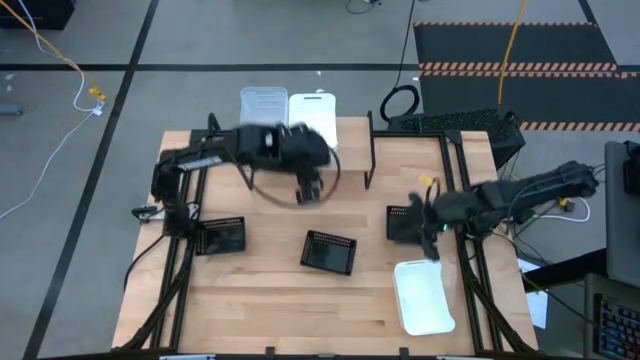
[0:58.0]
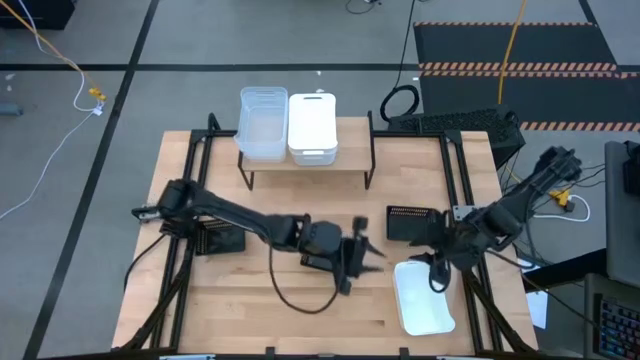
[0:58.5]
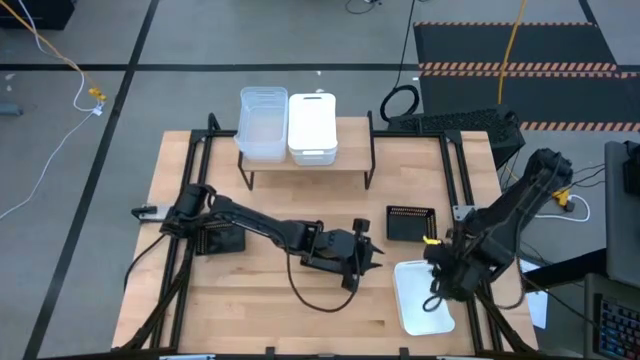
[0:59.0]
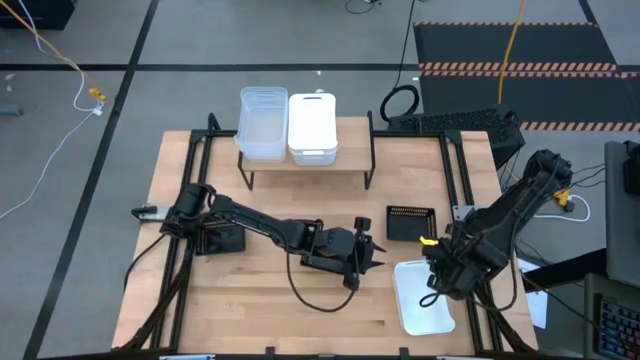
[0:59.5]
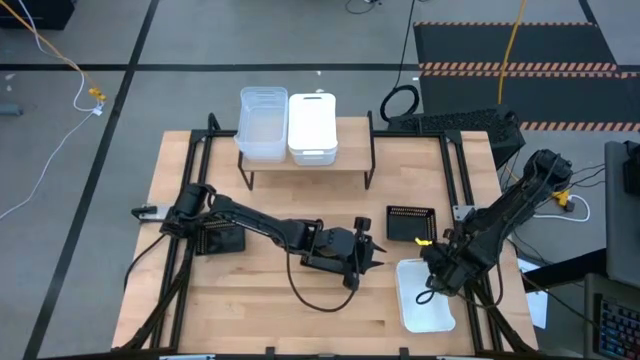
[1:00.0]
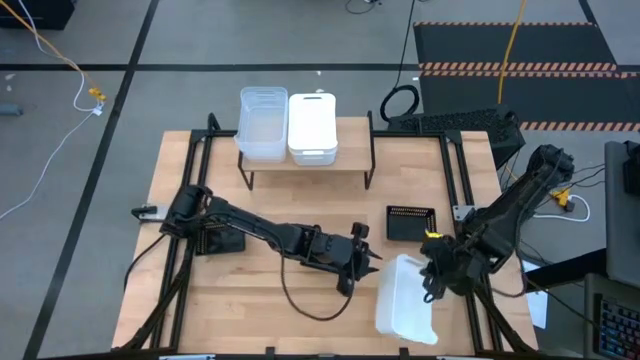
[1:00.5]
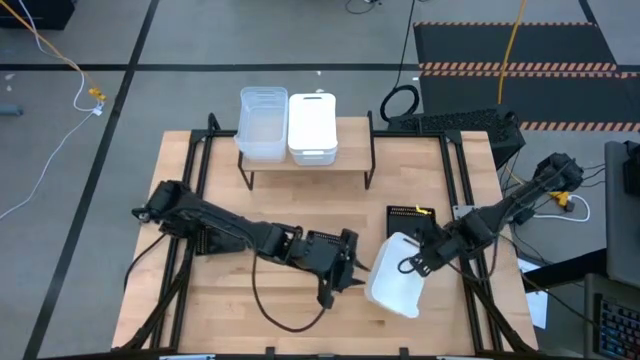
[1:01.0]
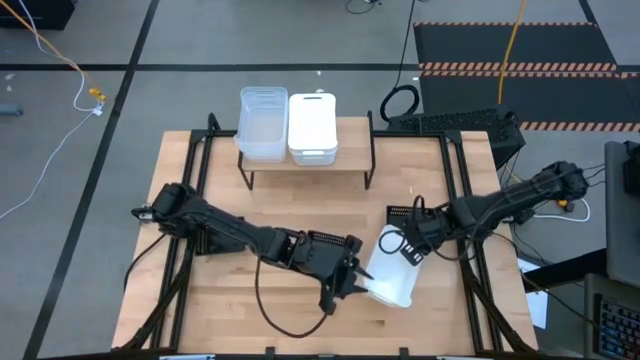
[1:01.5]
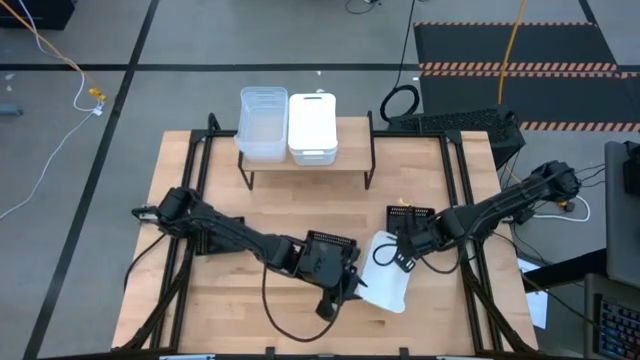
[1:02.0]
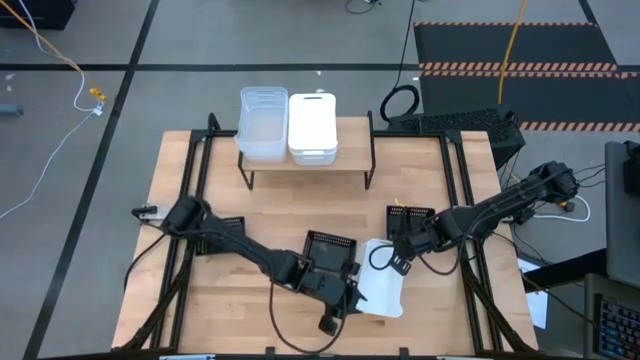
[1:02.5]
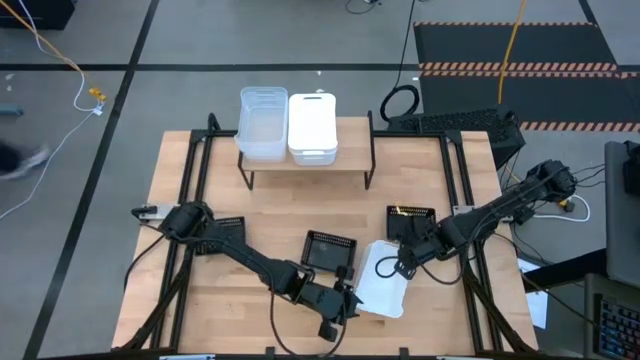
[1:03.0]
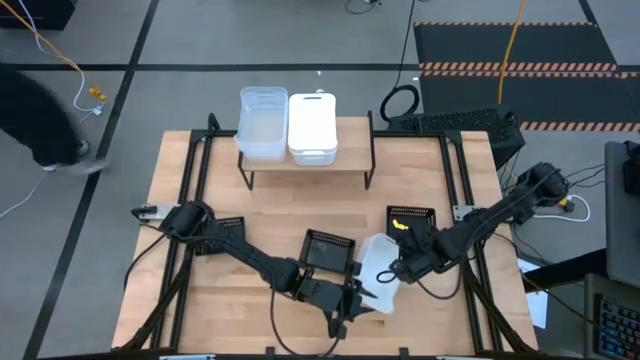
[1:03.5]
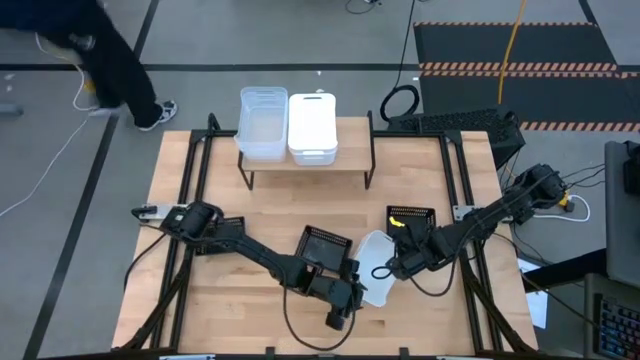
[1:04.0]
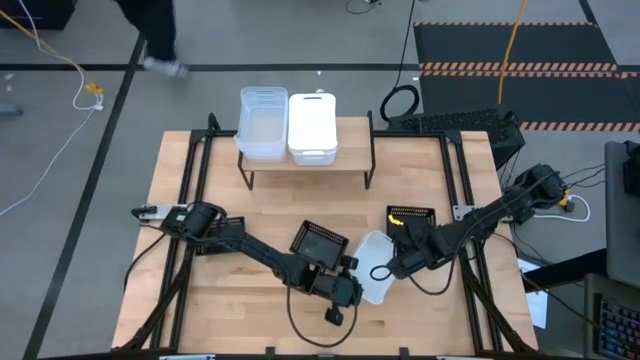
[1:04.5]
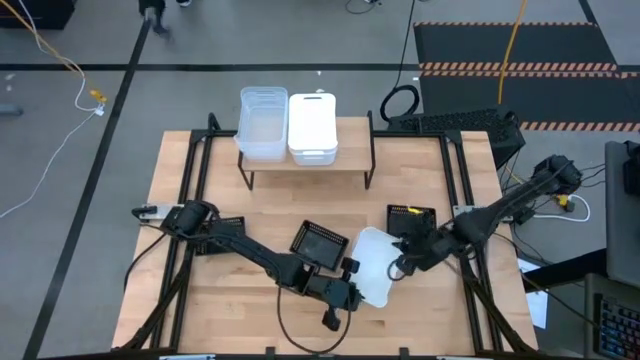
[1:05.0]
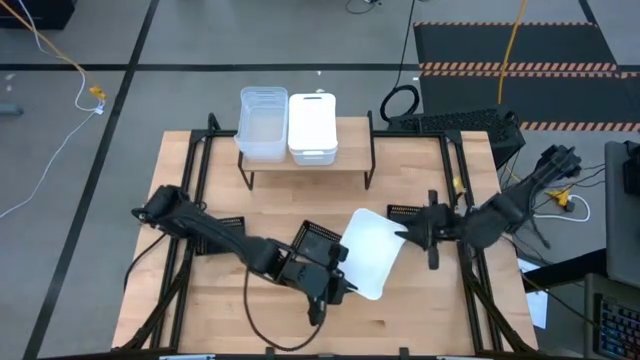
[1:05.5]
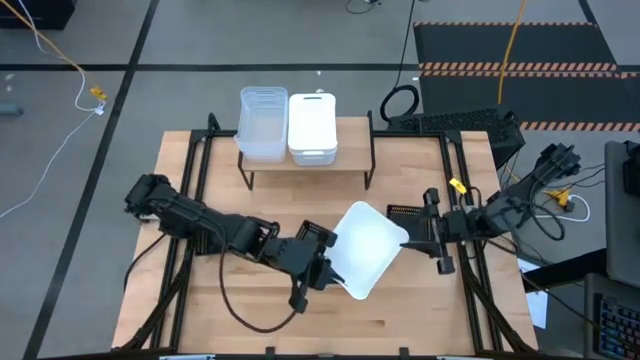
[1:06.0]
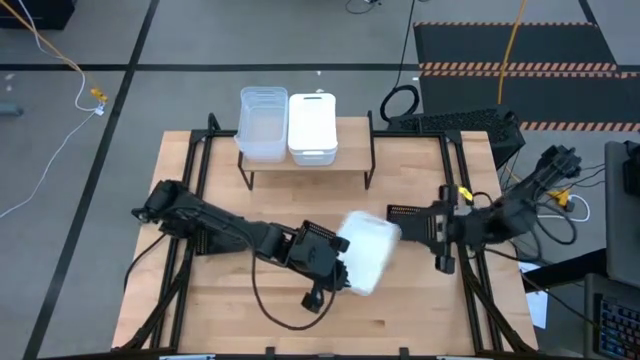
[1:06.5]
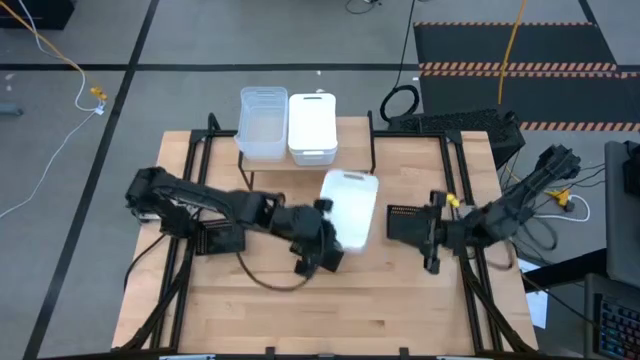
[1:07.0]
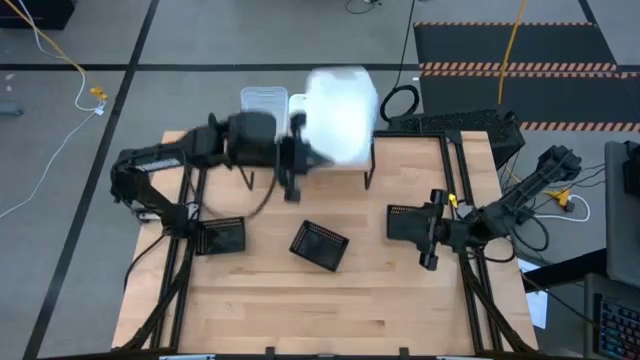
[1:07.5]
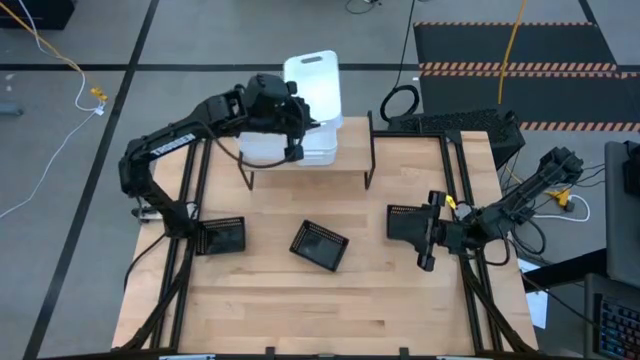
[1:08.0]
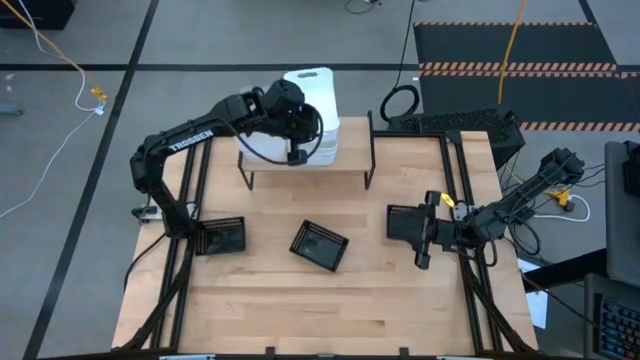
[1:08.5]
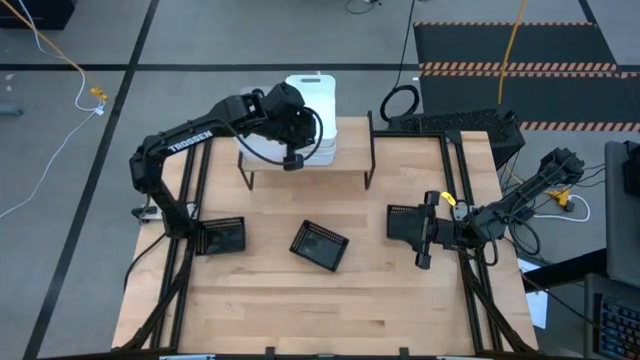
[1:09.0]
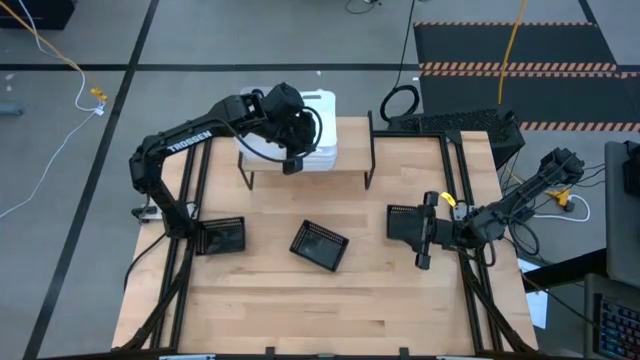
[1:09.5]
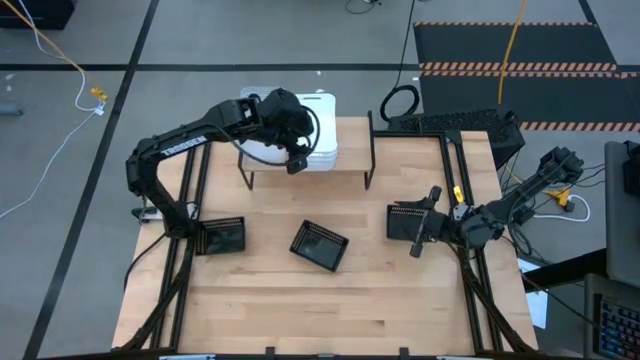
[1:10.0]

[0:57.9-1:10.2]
Task: Stack baskets on shelf by color
Stack the white bin on top of the white bin on the shelf

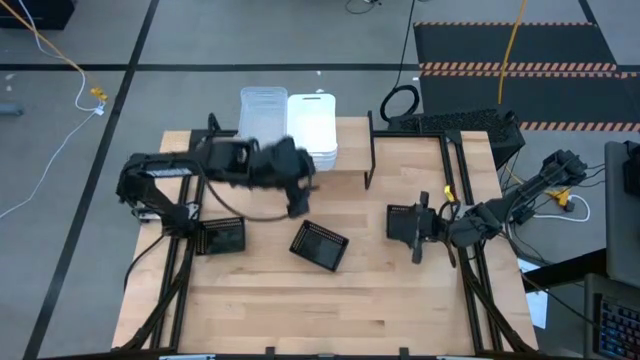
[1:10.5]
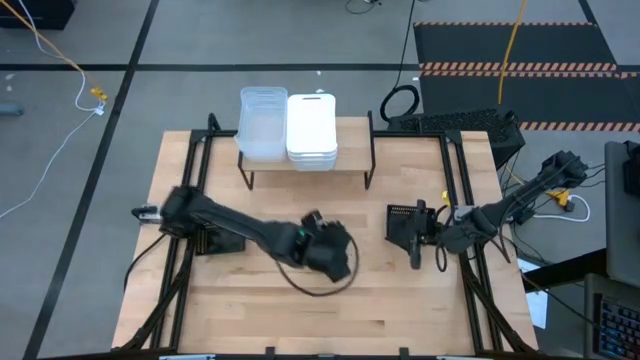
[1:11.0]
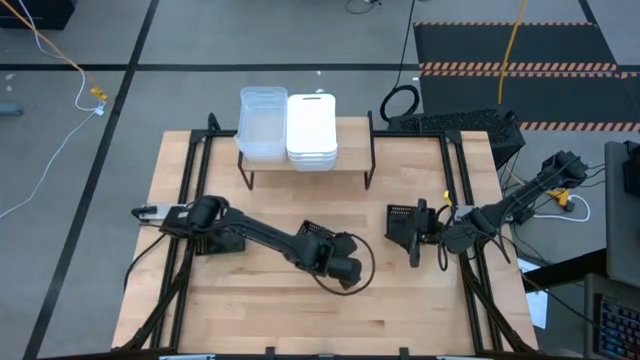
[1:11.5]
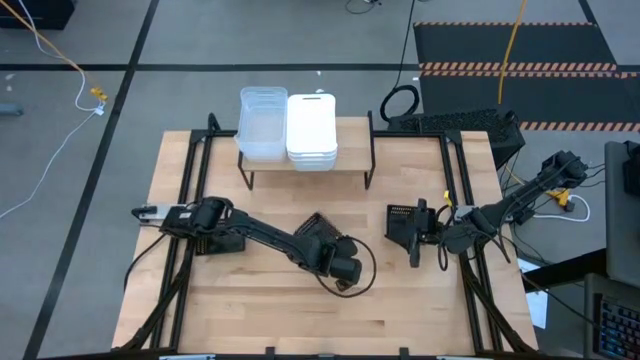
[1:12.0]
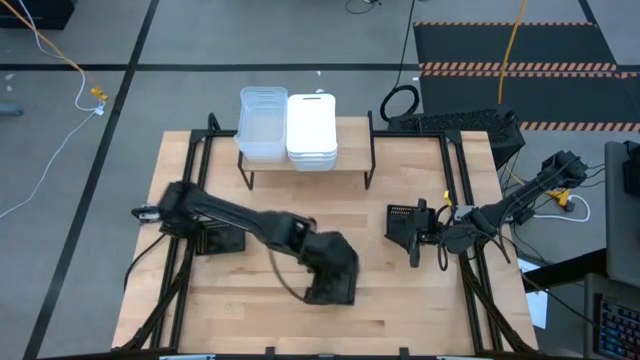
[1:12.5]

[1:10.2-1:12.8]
Put the center black bin on the shelf

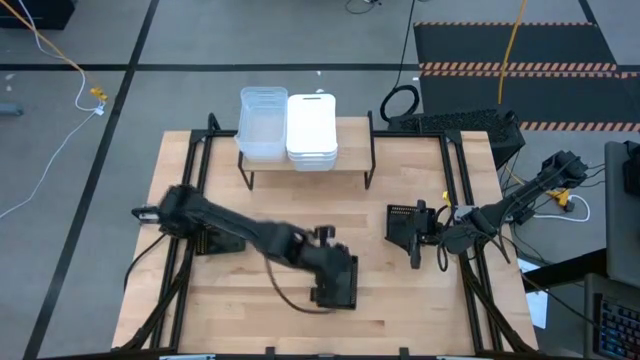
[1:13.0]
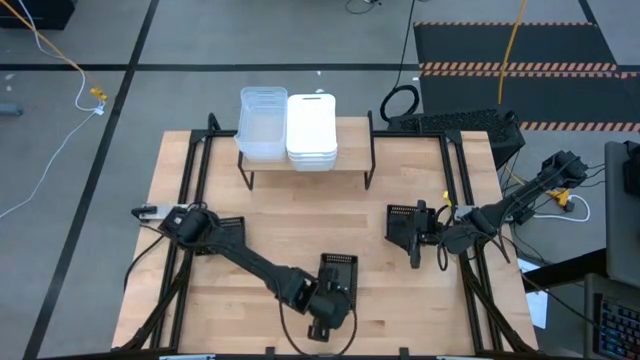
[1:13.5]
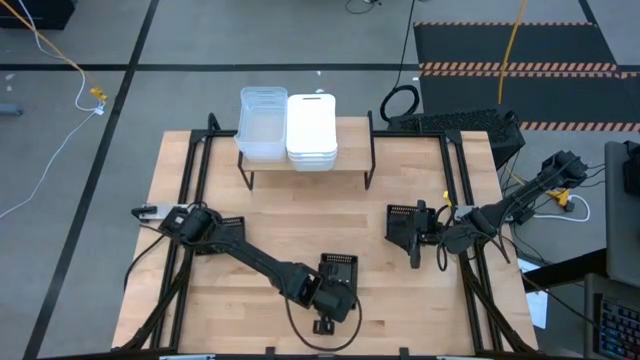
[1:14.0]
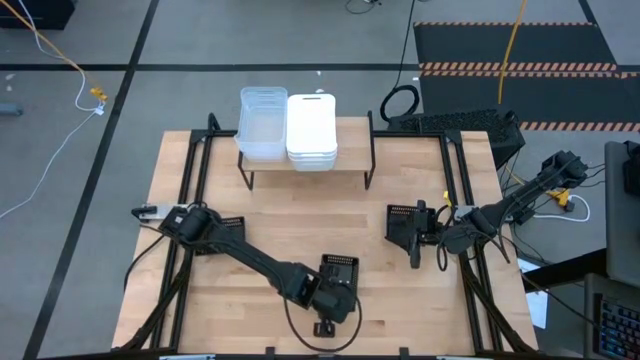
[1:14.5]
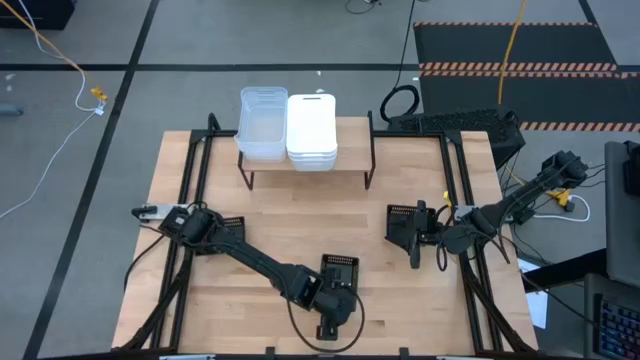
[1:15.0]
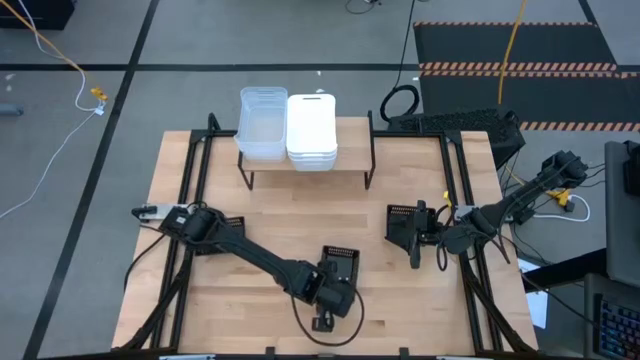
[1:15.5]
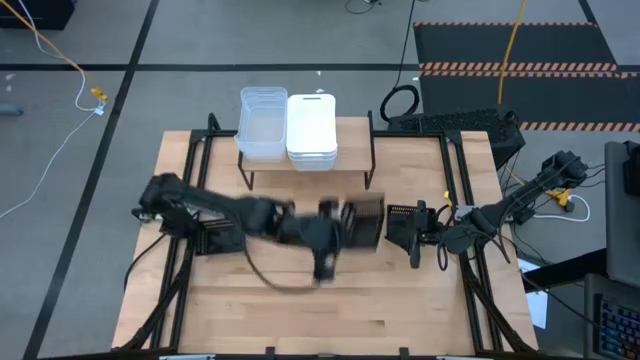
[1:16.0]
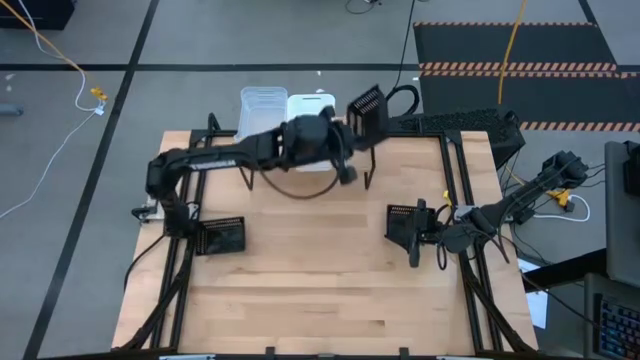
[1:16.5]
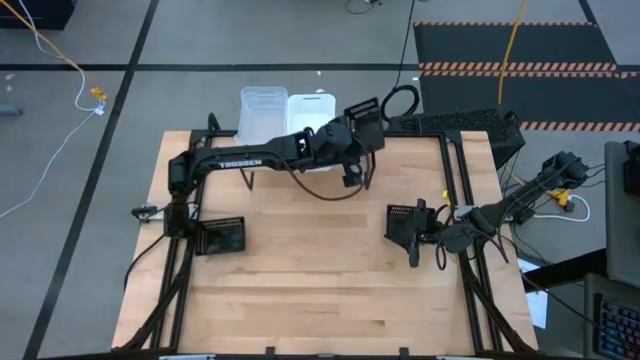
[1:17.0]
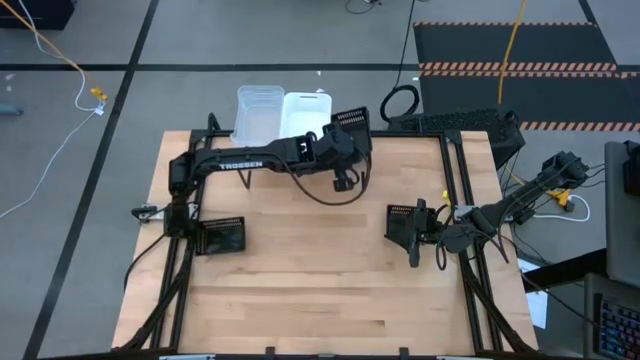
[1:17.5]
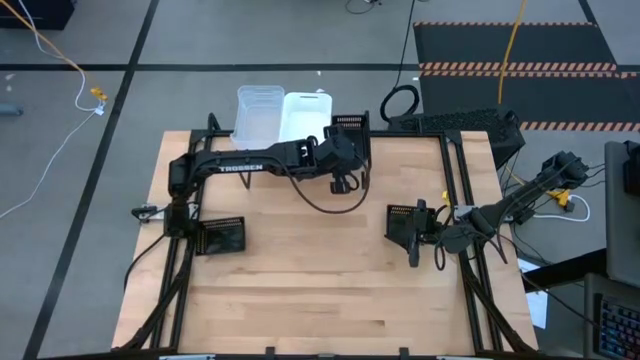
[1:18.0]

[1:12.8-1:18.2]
Put the middle bottom black bin on the shelf
